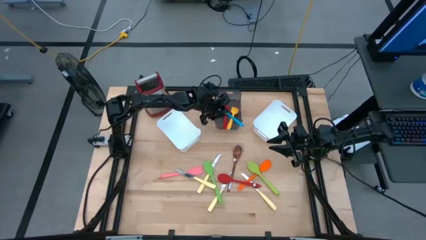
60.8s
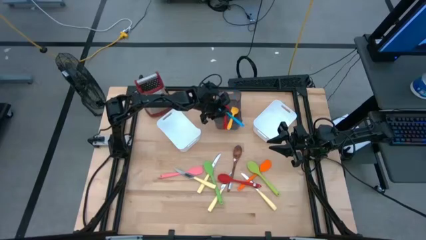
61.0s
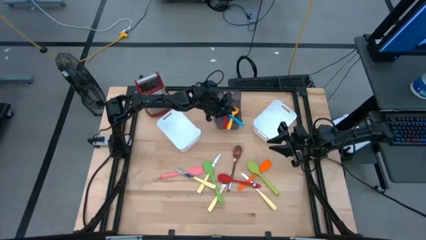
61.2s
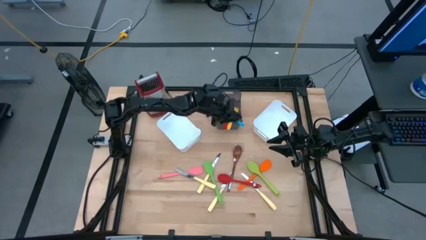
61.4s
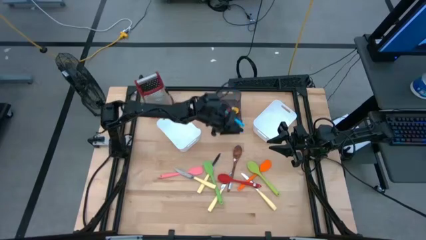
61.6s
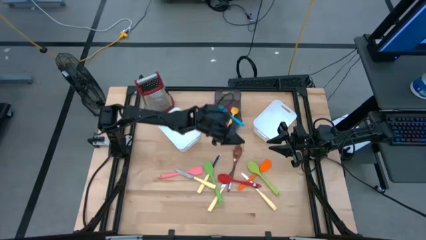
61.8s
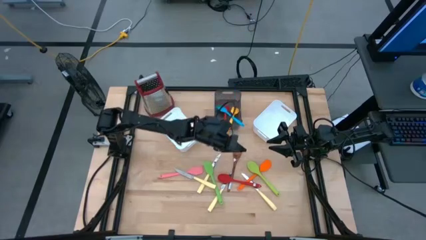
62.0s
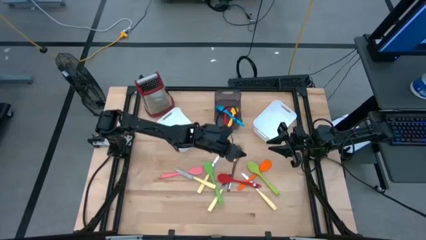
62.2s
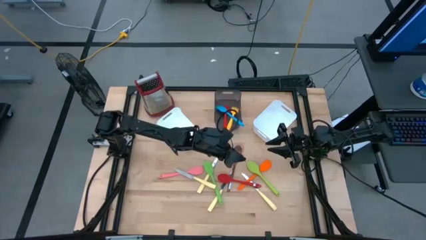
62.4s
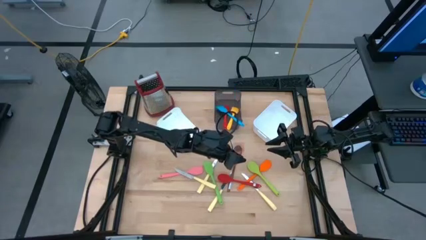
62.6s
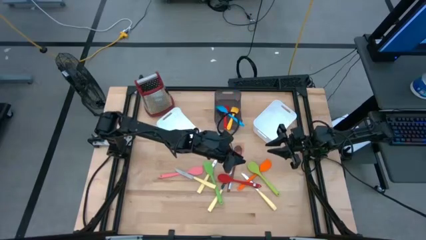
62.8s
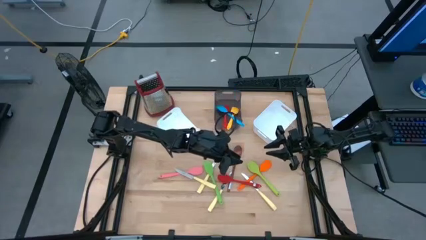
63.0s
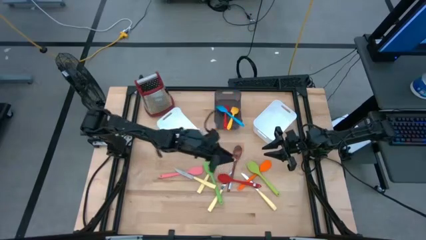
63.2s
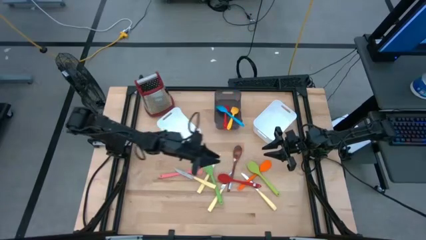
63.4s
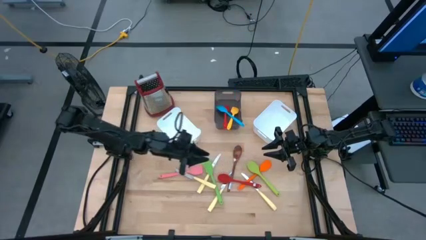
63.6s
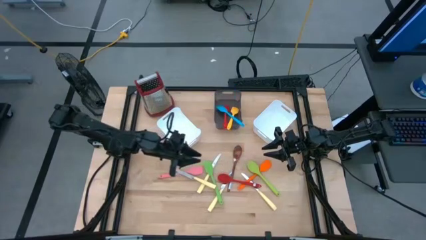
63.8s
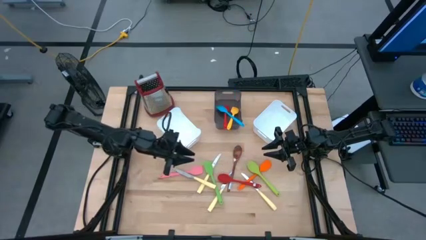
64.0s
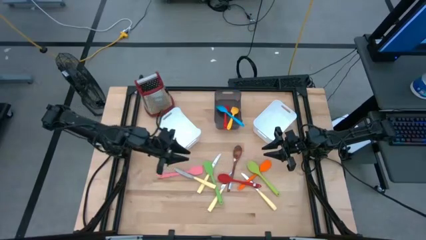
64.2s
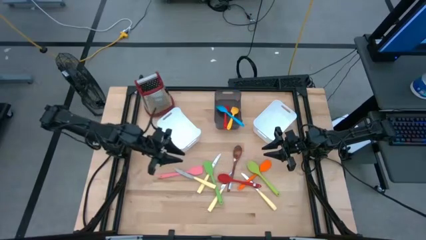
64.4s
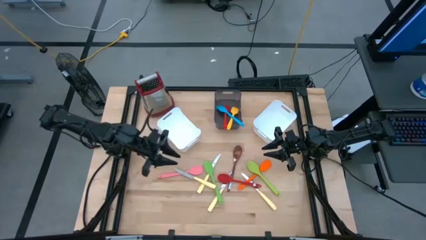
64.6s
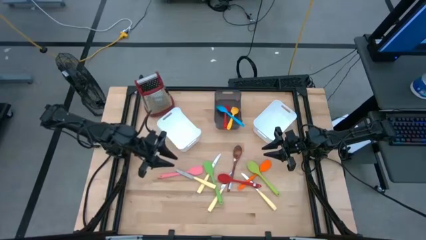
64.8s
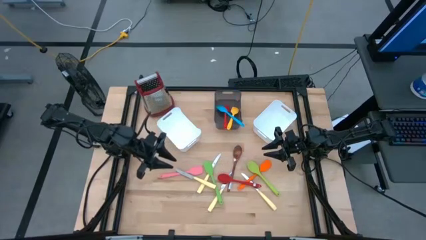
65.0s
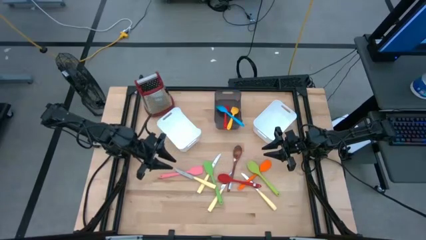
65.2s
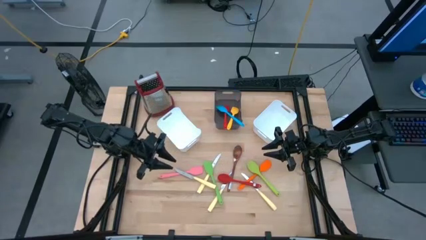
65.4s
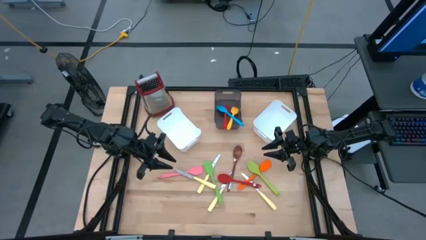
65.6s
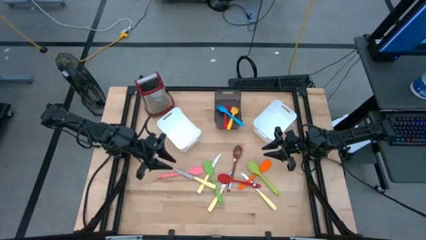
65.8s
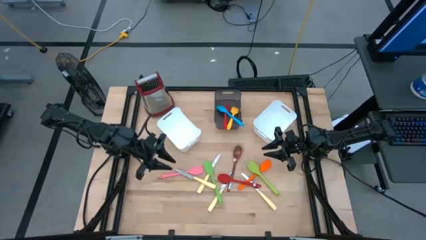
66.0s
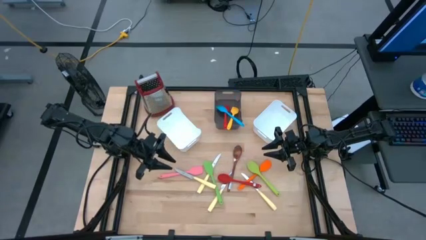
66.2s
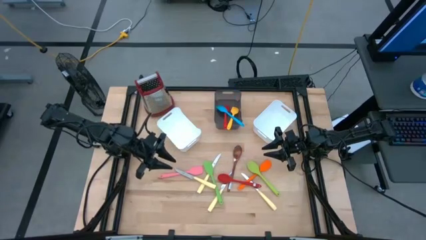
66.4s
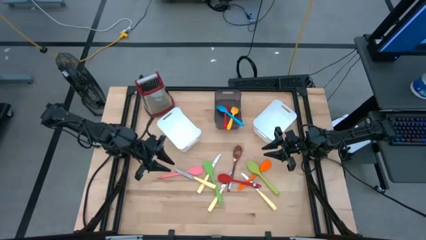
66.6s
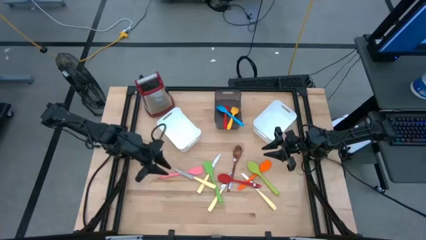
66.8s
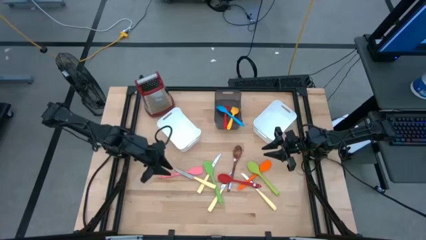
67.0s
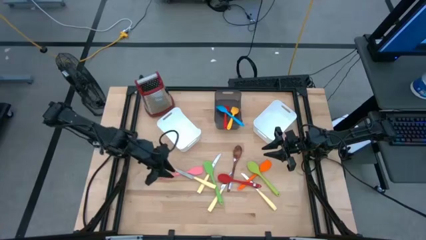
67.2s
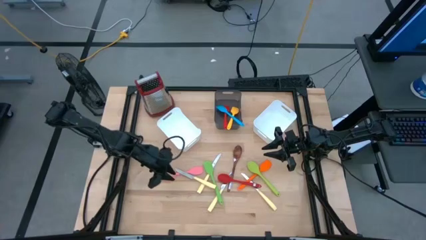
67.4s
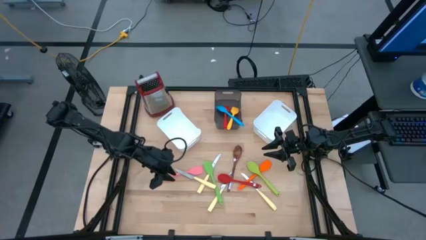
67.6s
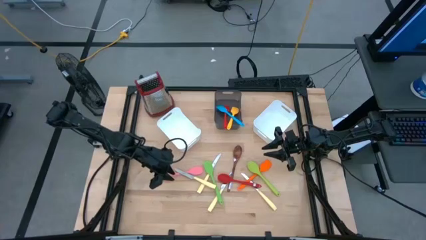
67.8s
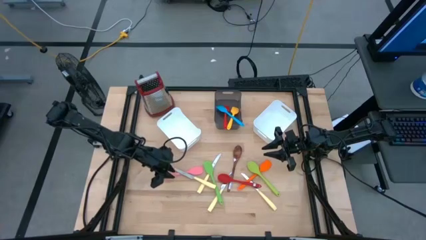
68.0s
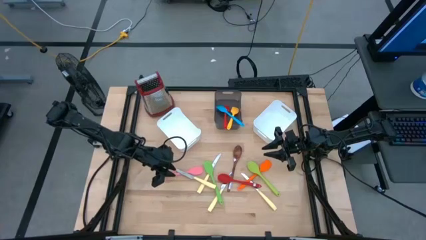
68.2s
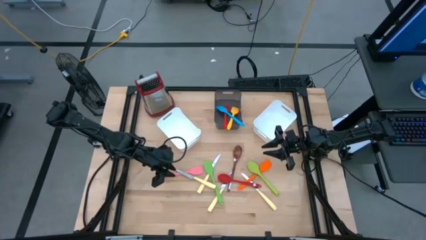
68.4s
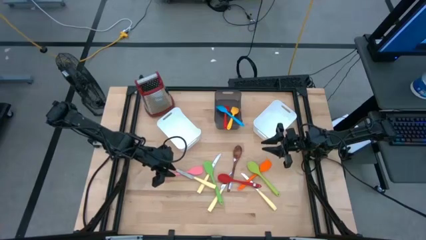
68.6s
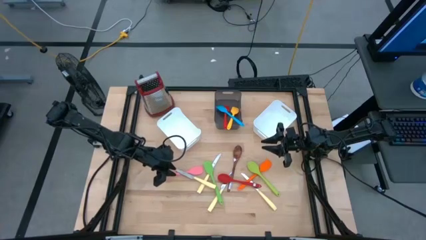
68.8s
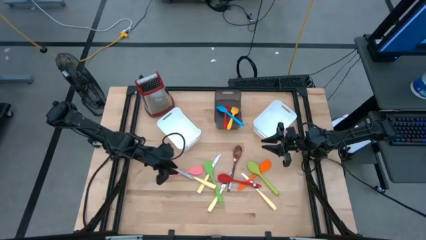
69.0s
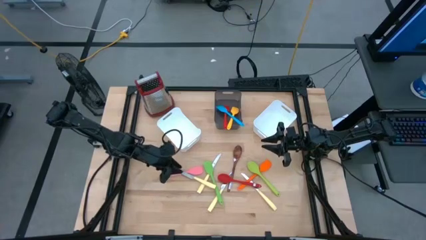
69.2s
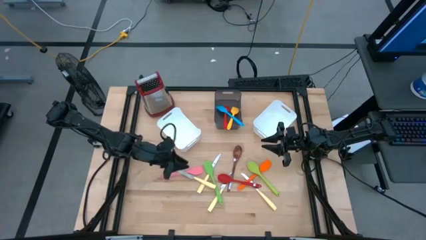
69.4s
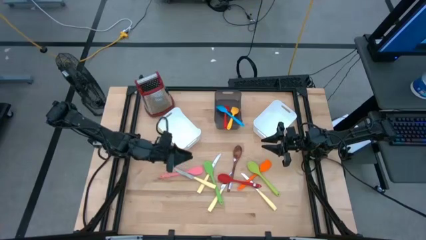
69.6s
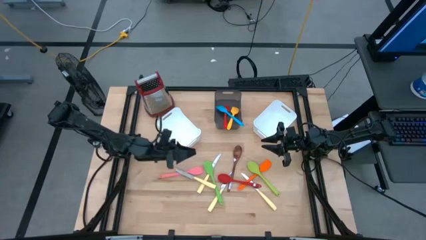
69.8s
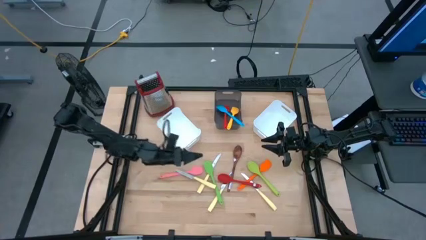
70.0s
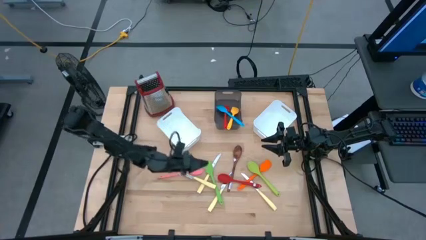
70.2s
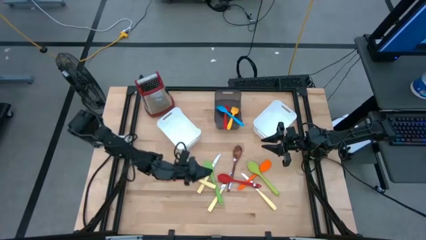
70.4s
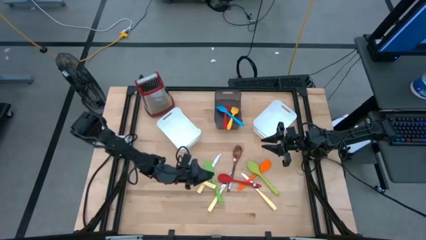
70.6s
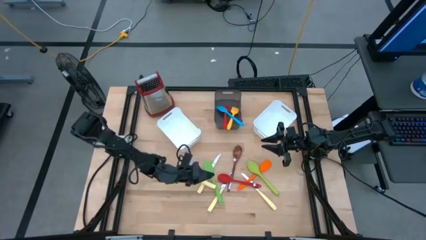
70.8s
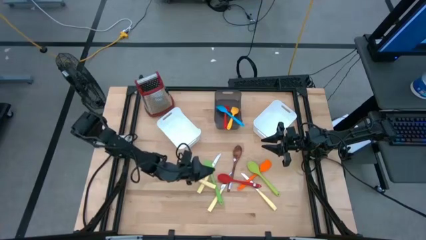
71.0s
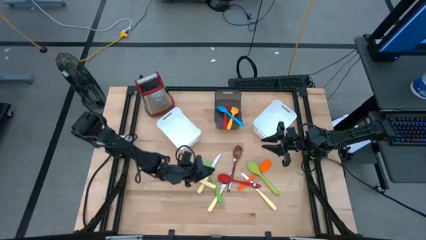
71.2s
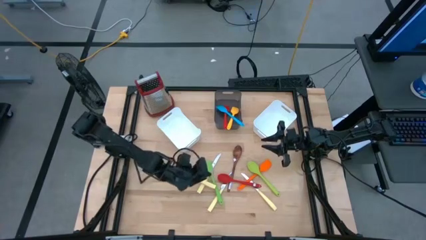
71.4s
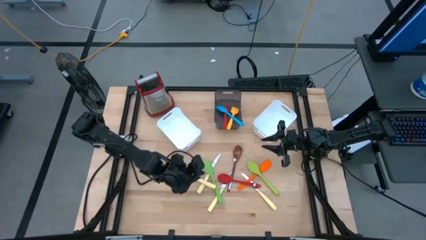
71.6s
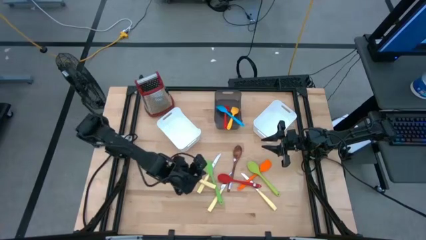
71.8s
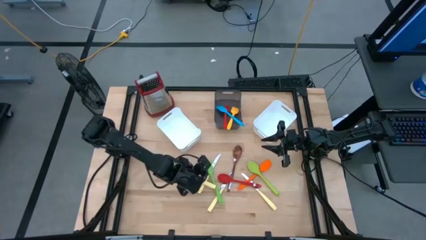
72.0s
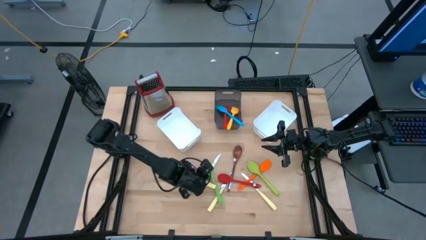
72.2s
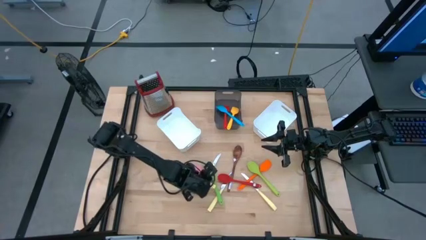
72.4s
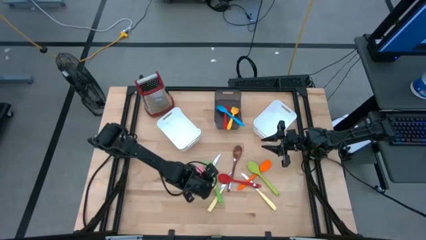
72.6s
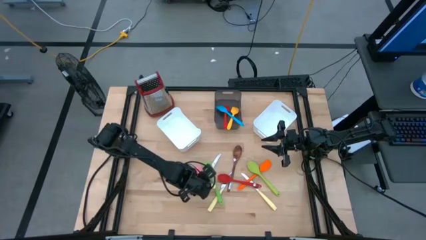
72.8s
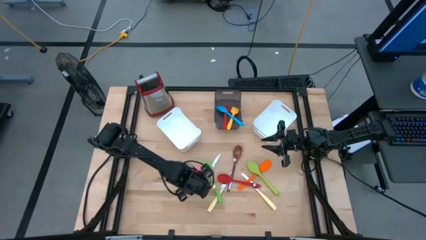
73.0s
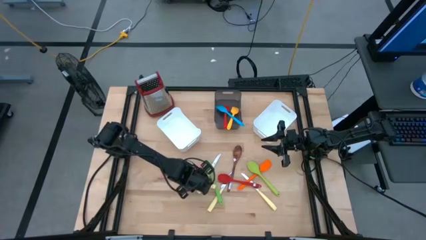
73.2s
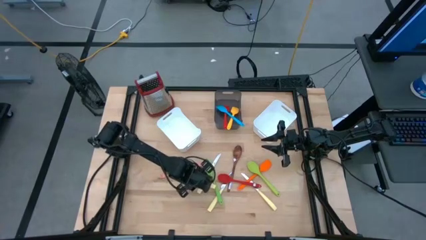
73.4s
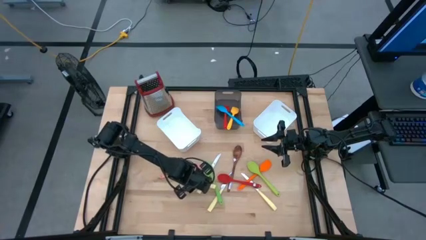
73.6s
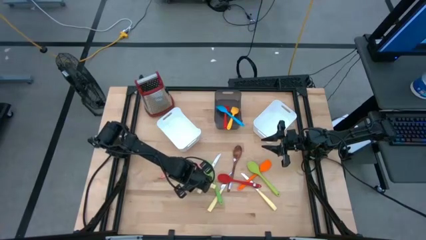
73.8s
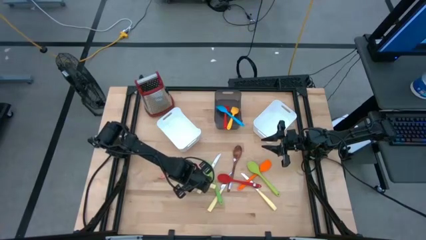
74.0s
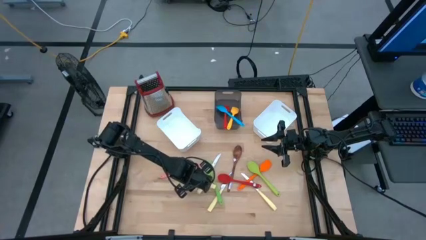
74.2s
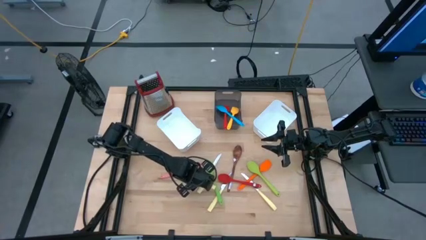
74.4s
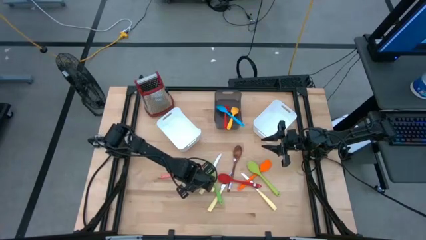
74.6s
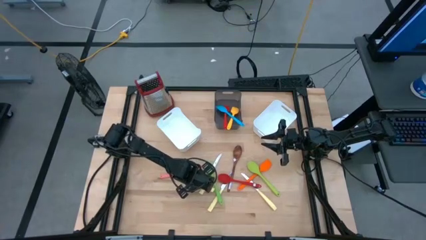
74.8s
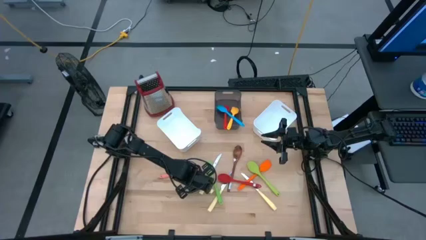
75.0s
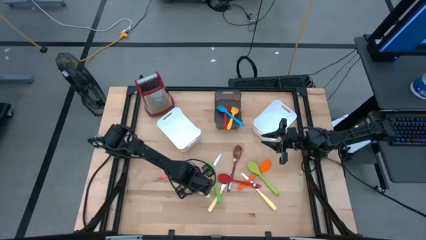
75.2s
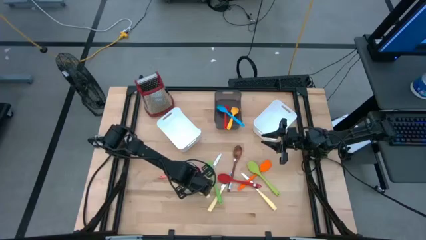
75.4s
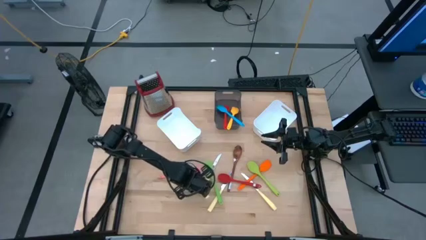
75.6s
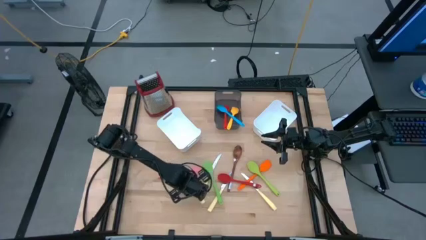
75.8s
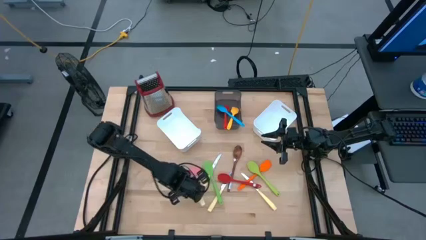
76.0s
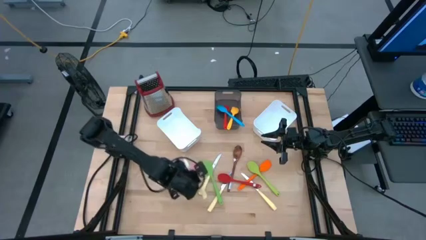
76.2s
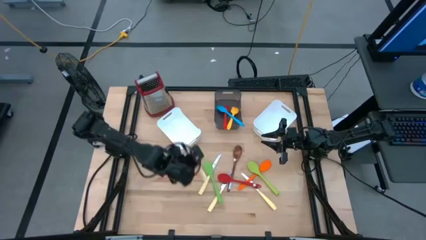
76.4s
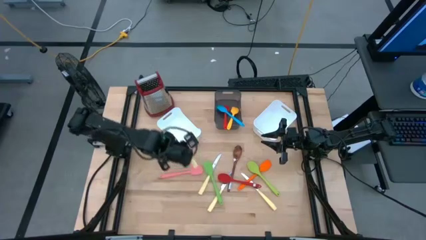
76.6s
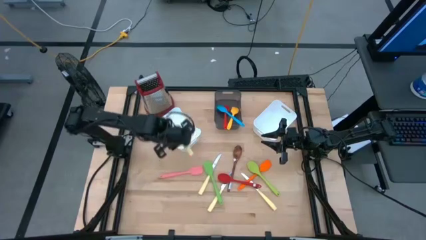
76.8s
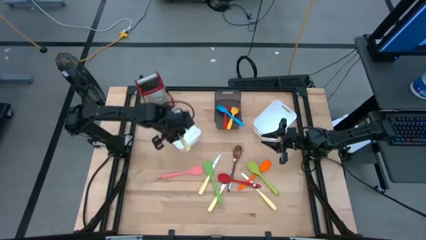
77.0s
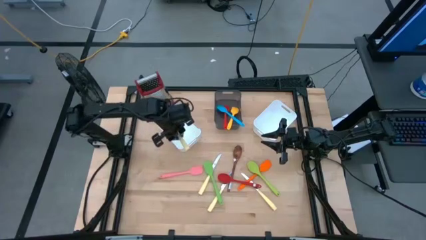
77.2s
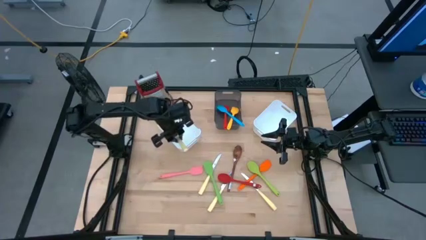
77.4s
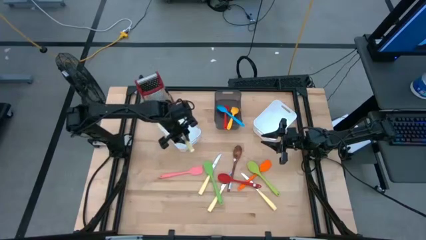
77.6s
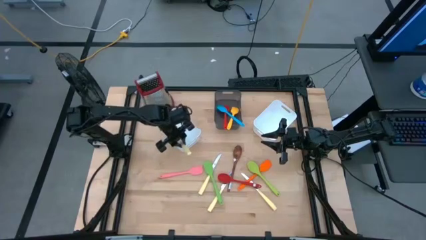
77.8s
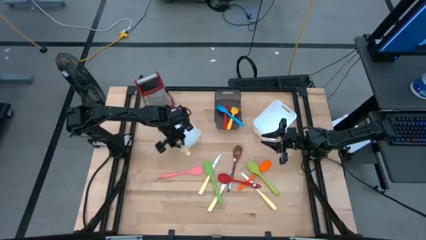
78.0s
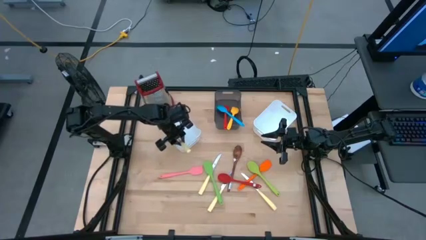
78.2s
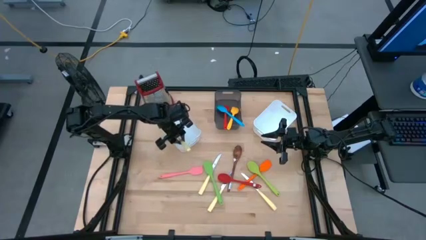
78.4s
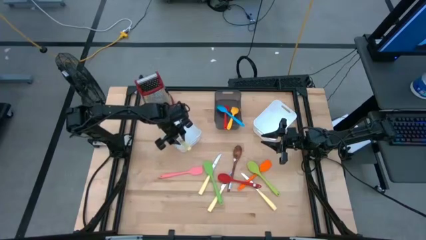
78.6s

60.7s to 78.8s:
Task: Pick & Place Kitchen Items
Put the yellow knife into the left white bin
